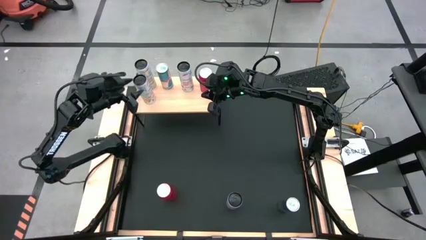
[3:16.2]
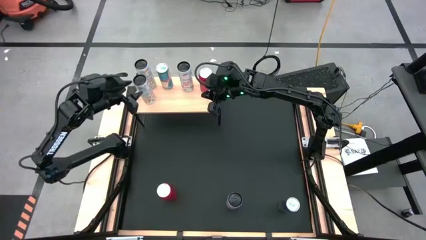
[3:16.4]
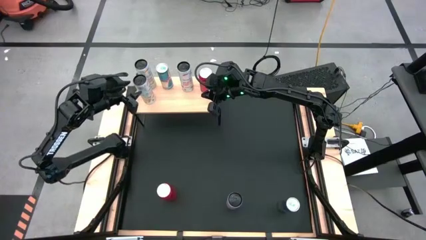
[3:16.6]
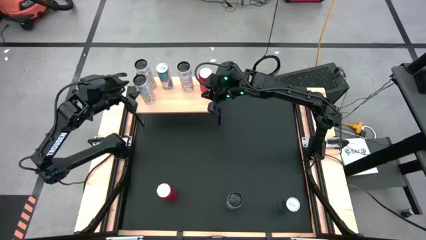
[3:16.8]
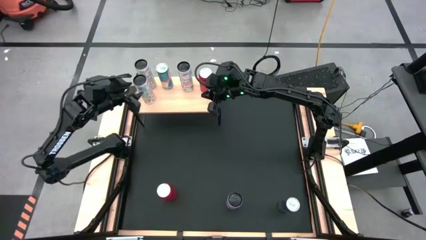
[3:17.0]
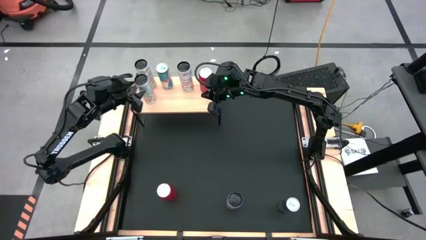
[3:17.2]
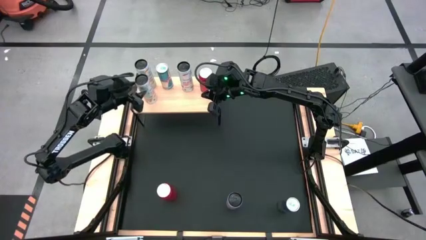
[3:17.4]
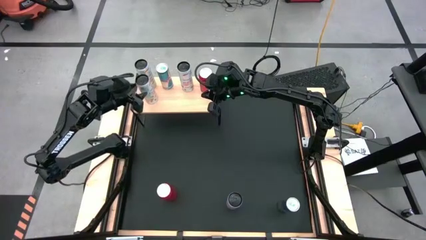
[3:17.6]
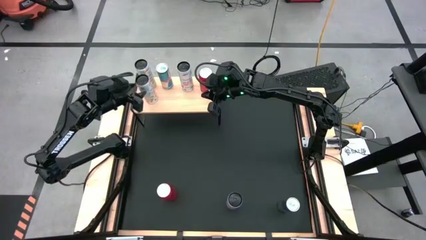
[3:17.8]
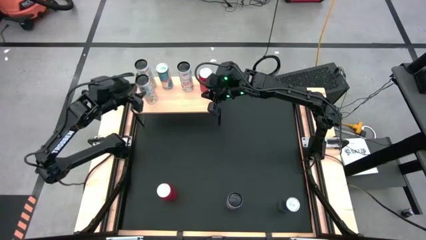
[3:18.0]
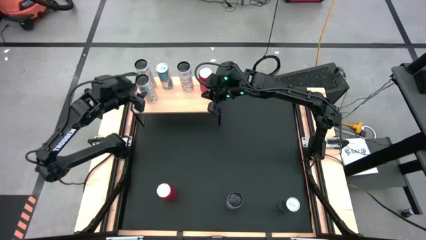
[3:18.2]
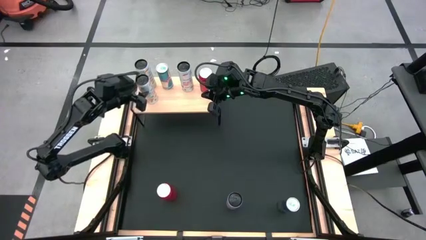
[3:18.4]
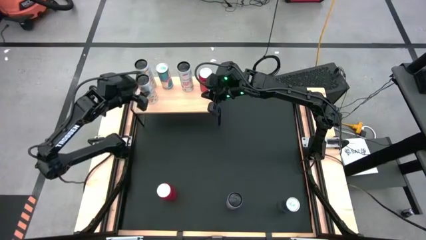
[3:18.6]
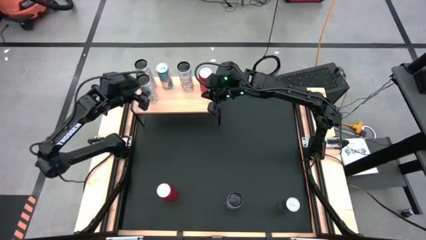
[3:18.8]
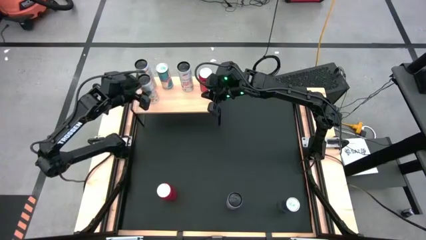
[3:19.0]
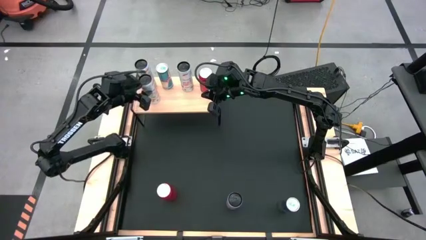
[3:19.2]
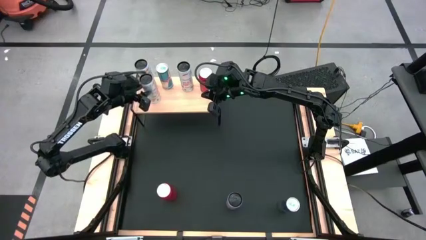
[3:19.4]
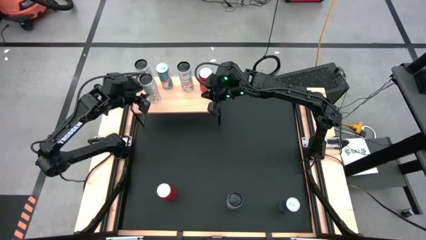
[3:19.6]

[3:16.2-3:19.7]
Task: Place canned beverage on shelf
Put the white yellow soda can on the shelf aligned with the white yellow soda can

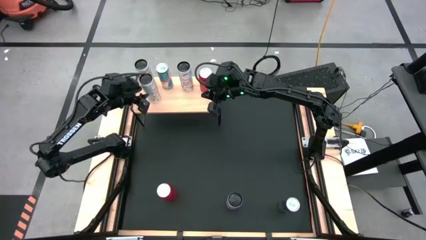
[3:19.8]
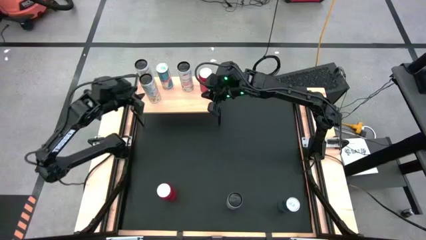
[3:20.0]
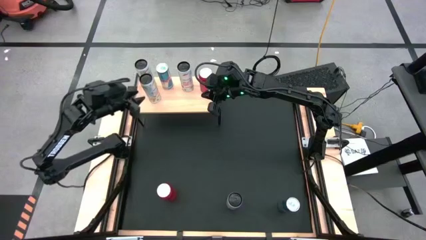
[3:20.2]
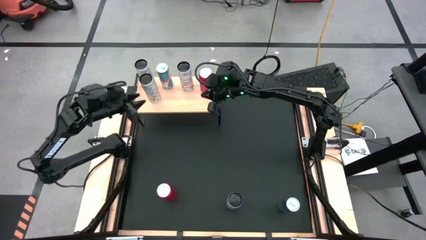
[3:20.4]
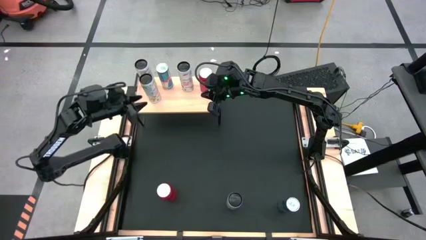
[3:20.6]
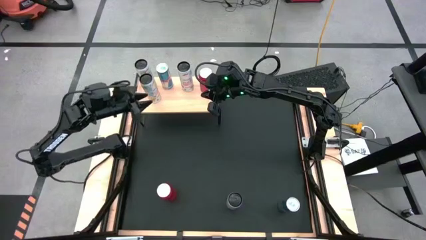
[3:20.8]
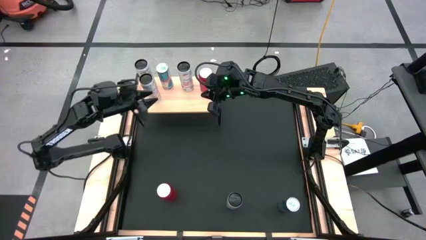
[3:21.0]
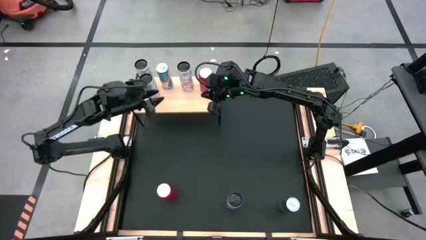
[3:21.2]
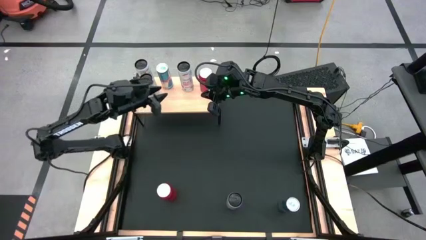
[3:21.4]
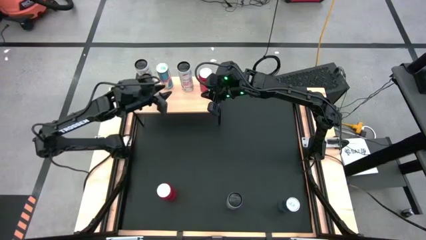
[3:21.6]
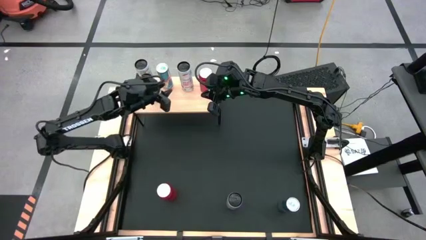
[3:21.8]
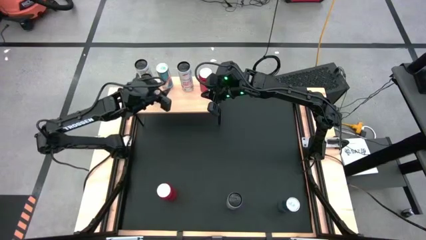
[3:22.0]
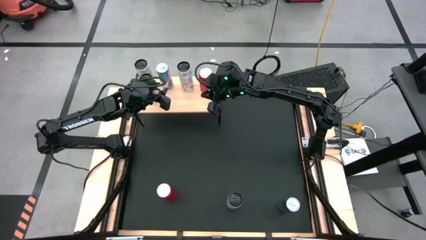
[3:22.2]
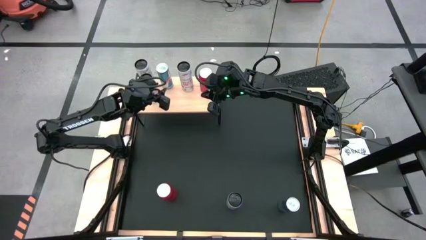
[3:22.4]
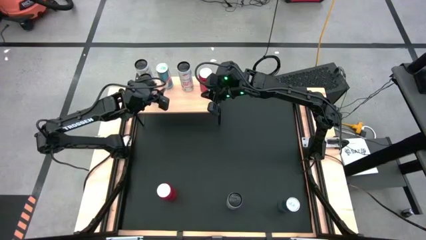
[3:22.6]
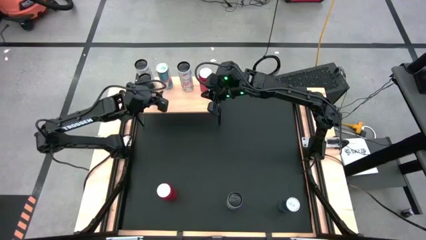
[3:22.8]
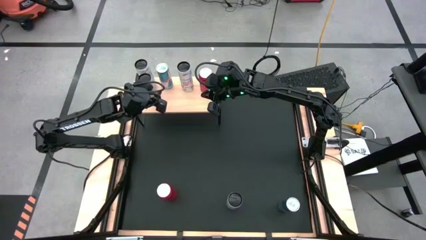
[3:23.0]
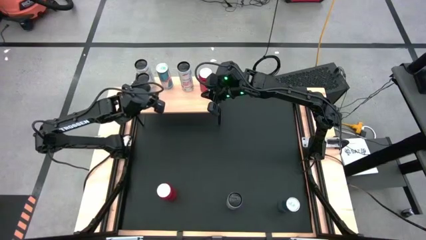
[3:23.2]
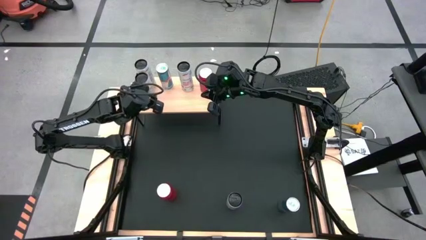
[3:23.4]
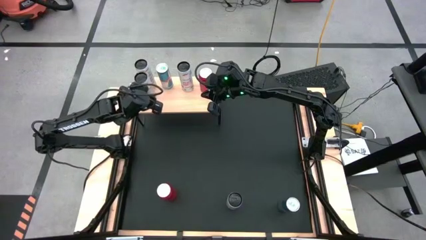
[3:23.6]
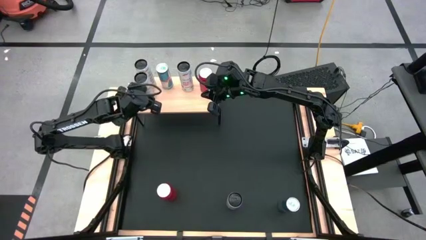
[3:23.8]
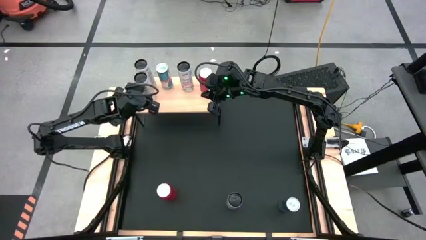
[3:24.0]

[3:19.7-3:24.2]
Put the white yellow soda can on the shelf aligned with the white yellow soda can

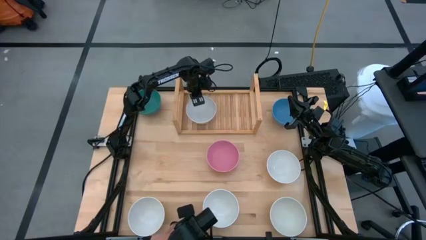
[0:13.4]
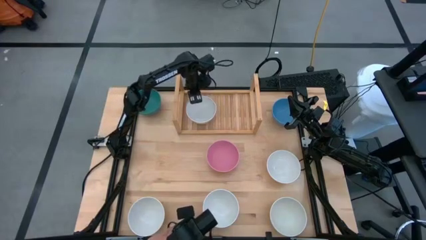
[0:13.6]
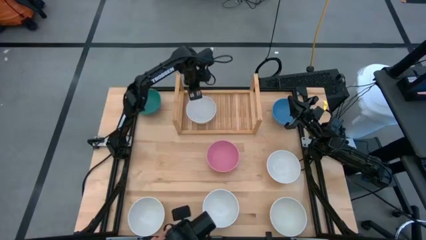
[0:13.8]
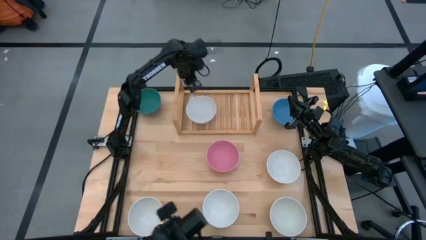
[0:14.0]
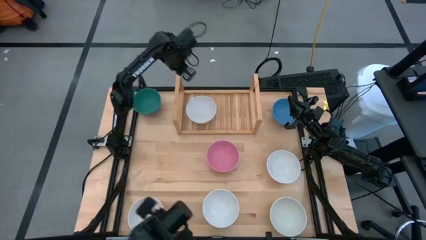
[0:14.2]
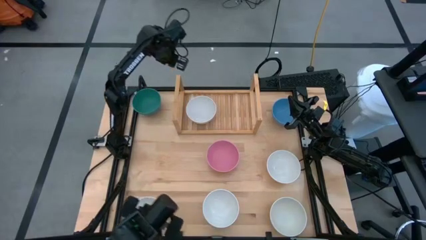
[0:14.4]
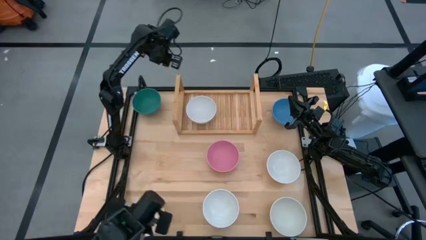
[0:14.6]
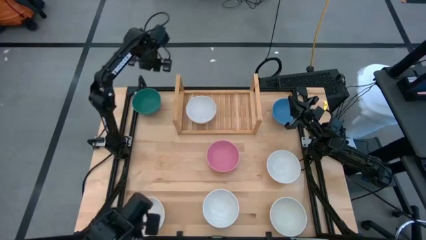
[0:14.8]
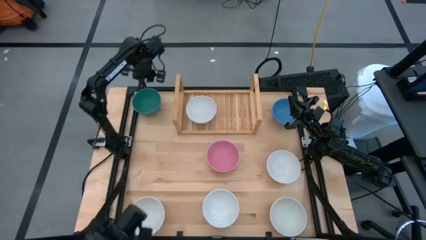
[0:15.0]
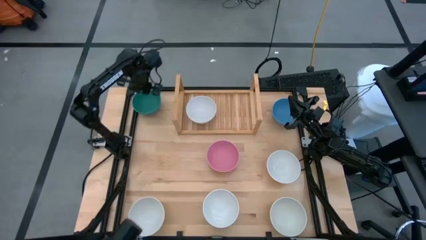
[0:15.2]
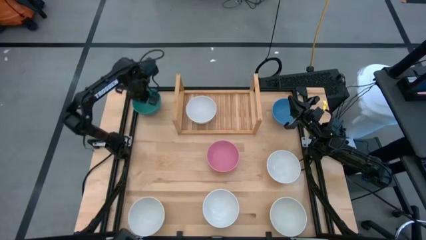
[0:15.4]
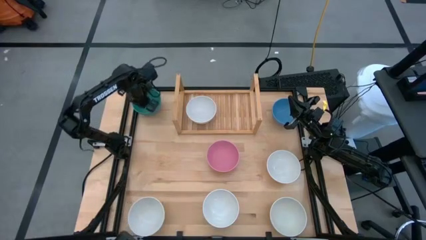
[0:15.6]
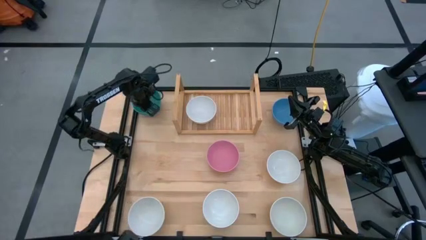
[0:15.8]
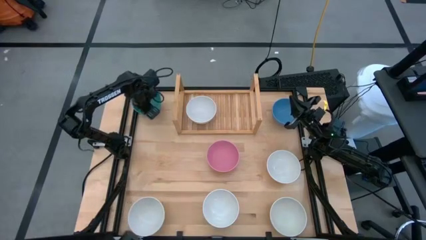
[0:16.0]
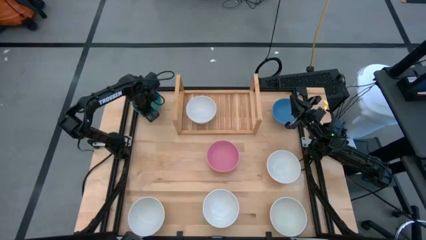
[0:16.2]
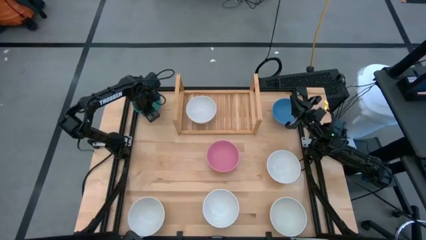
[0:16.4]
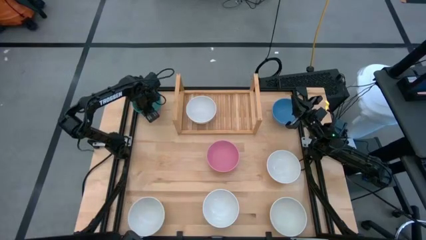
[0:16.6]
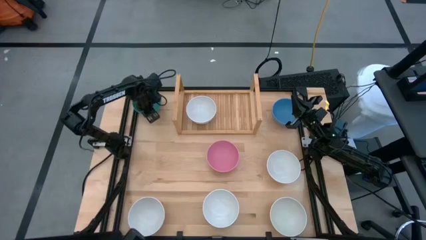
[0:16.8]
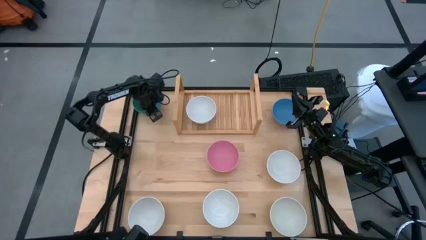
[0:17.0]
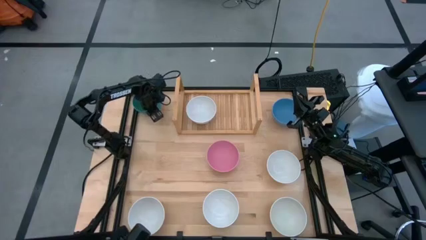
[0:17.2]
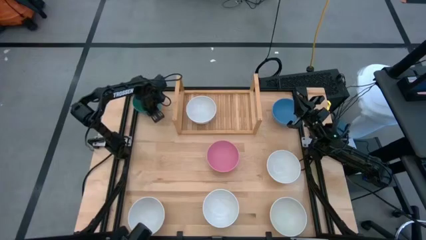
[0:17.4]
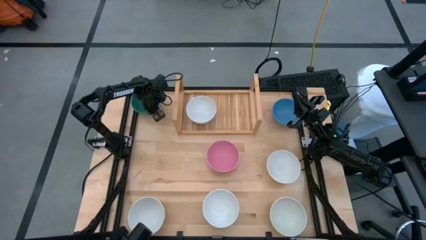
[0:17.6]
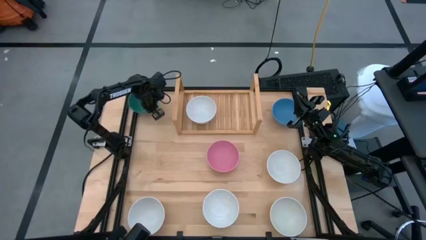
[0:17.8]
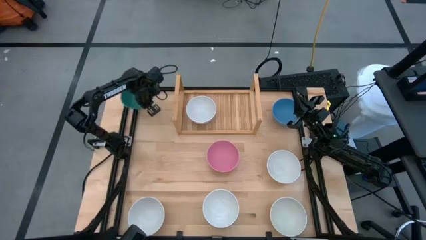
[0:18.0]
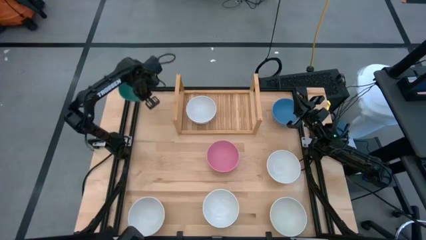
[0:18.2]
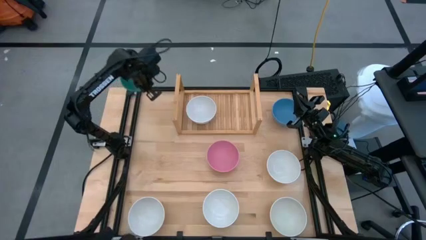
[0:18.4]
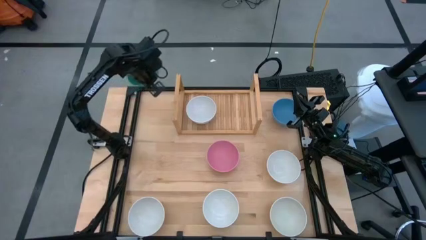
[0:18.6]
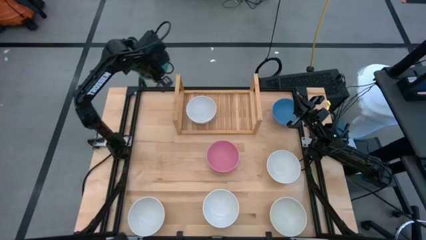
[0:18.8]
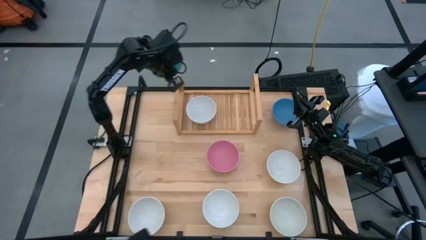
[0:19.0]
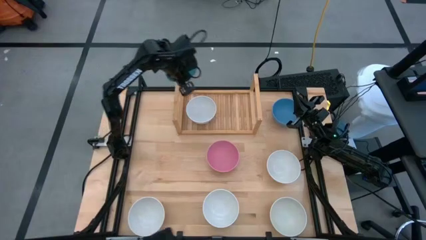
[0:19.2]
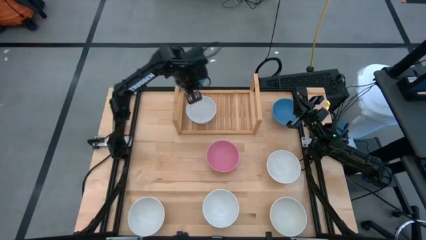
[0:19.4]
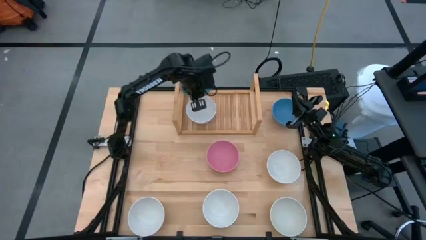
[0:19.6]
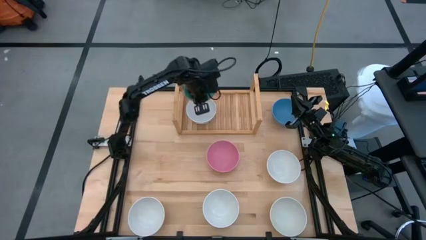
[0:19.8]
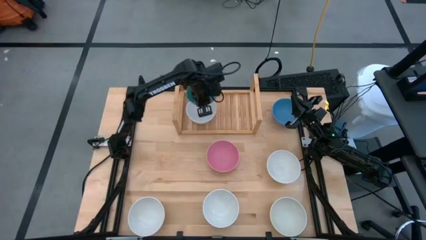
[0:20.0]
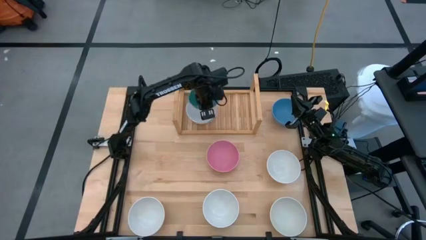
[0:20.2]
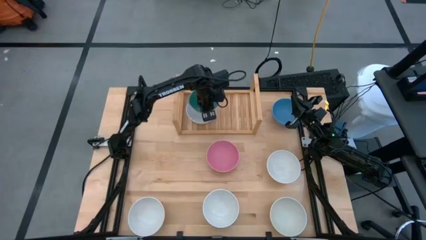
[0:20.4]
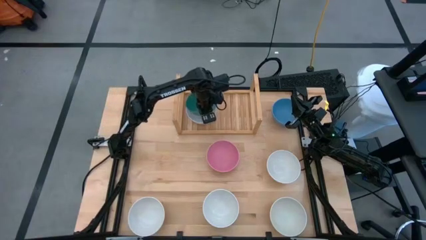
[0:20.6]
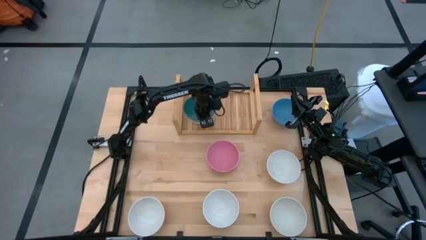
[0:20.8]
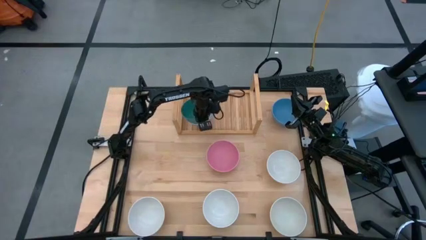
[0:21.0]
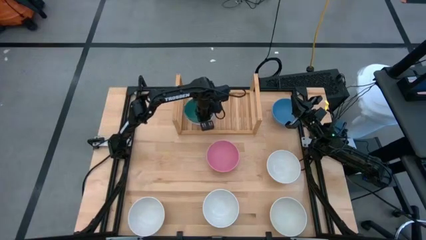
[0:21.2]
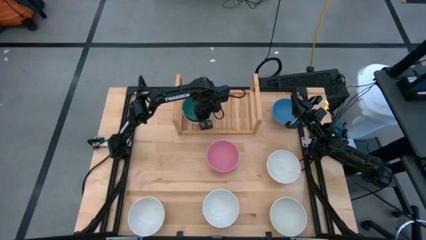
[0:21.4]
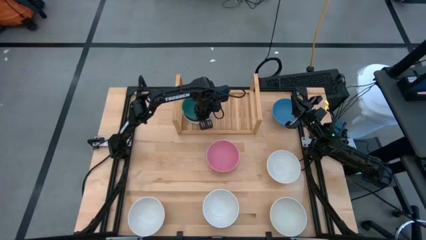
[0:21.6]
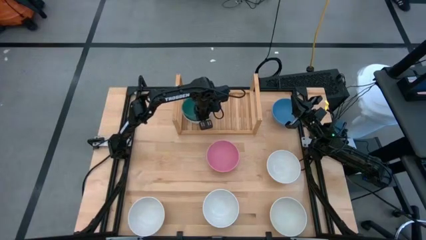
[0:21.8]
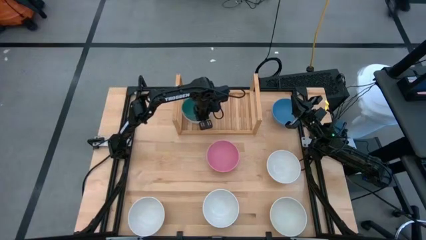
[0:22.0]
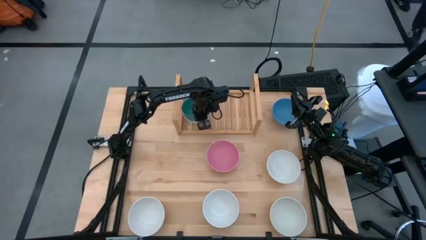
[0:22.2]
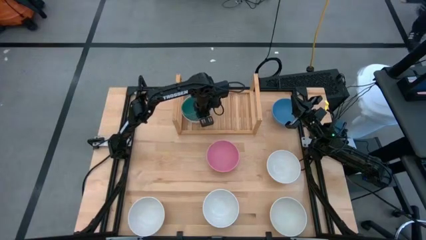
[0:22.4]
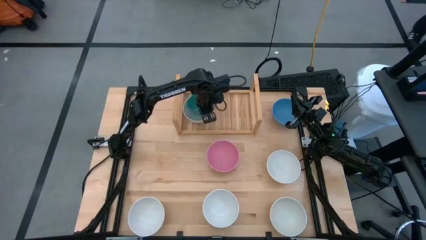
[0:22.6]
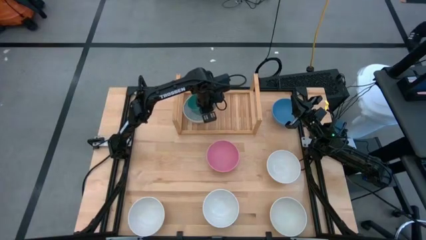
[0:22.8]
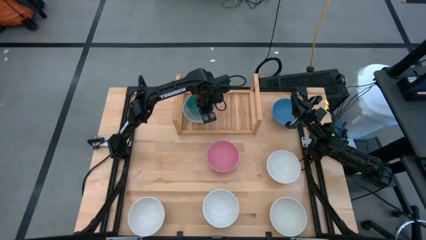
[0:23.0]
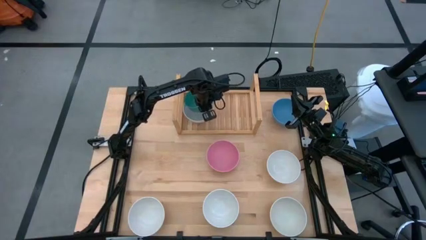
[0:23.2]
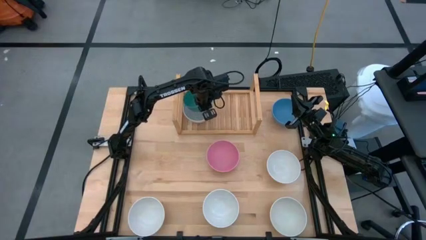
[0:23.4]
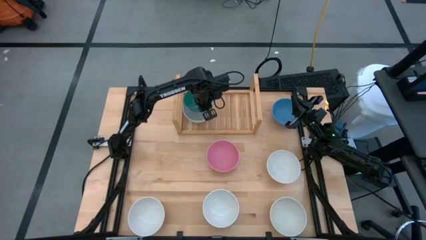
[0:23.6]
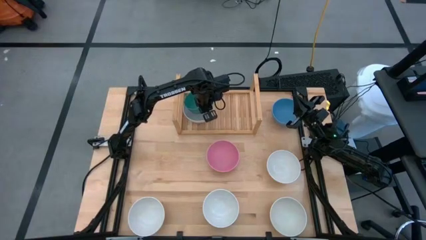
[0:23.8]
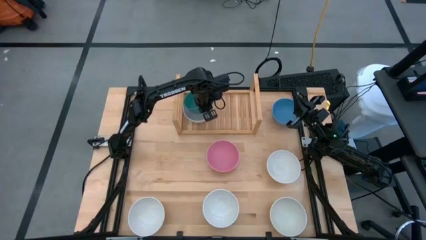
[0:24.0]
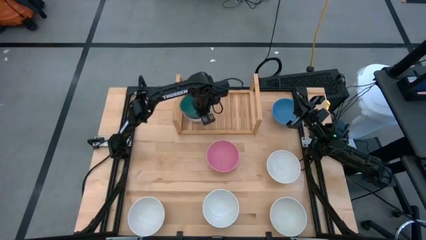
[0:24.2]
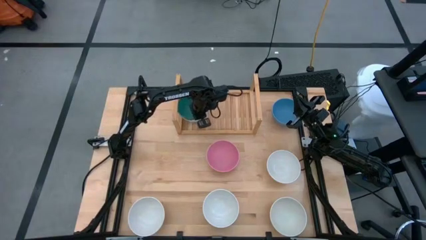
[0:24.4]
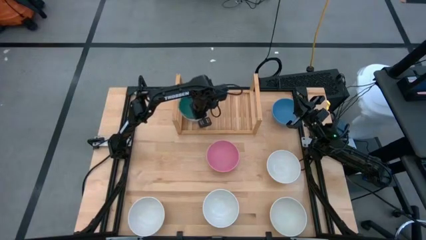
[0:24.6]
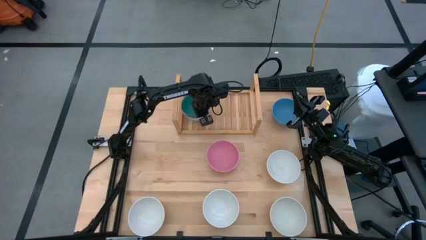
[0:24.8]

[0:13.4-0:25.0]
Task: Place and stack bowls onto a shelf
Stack the green bowl on top of the white bowl on the shelf
